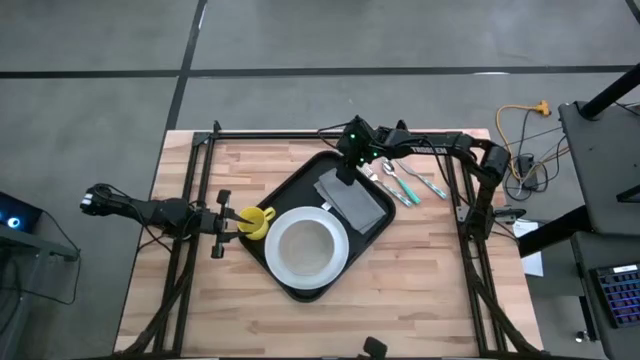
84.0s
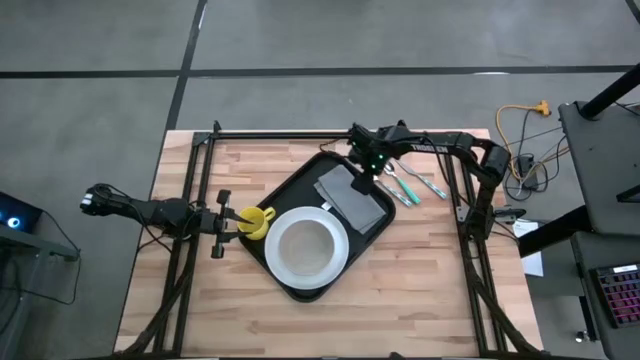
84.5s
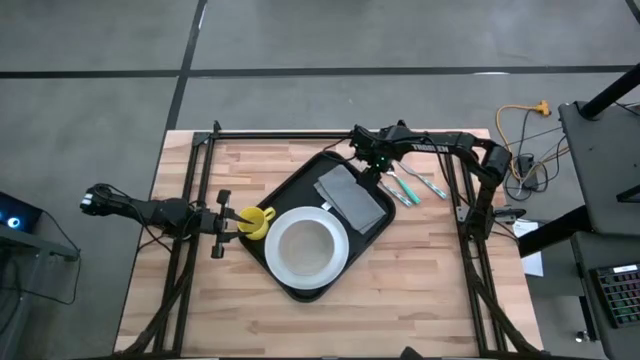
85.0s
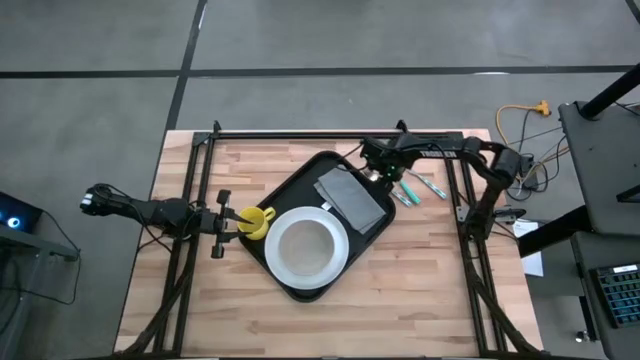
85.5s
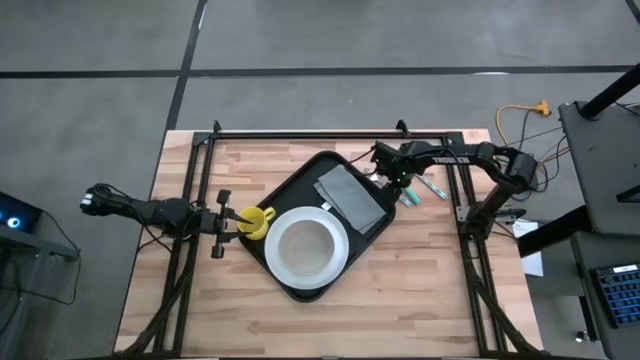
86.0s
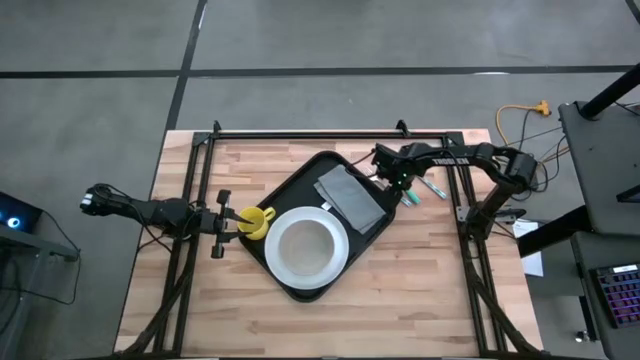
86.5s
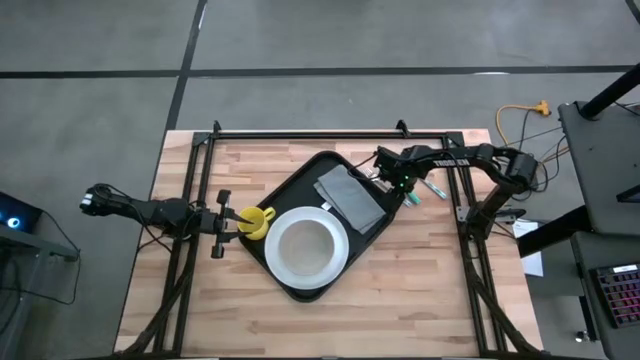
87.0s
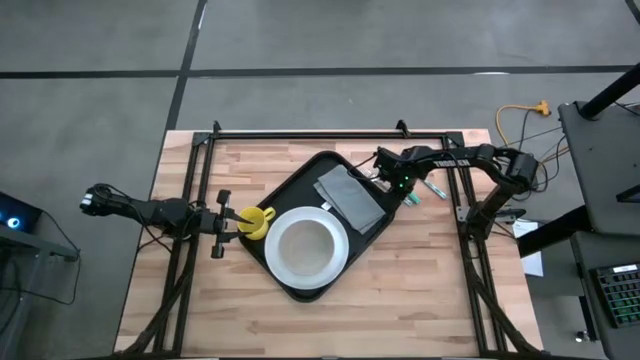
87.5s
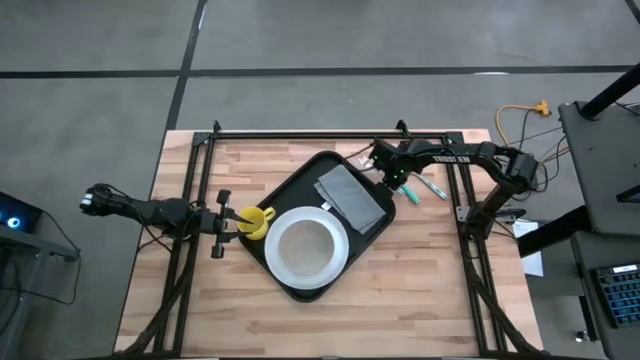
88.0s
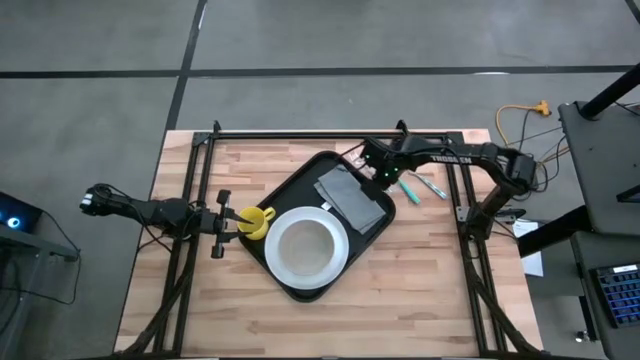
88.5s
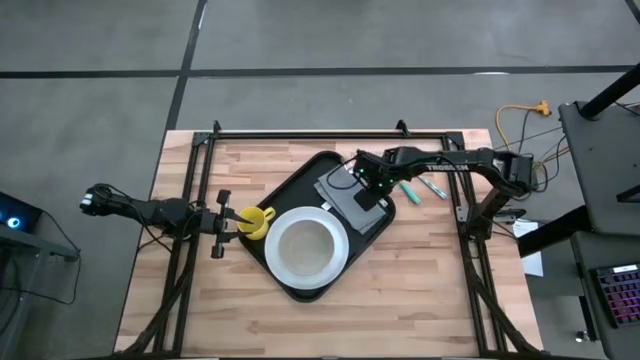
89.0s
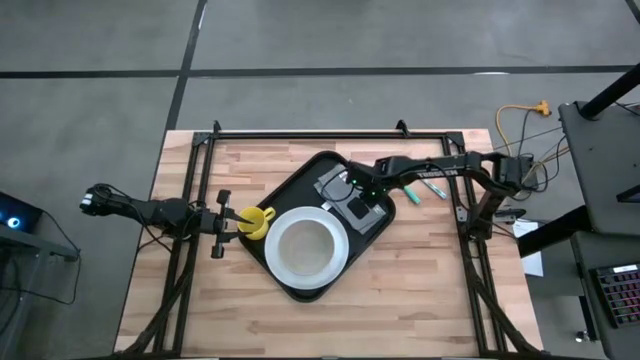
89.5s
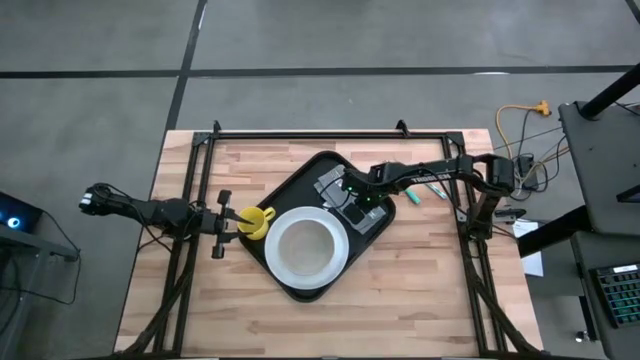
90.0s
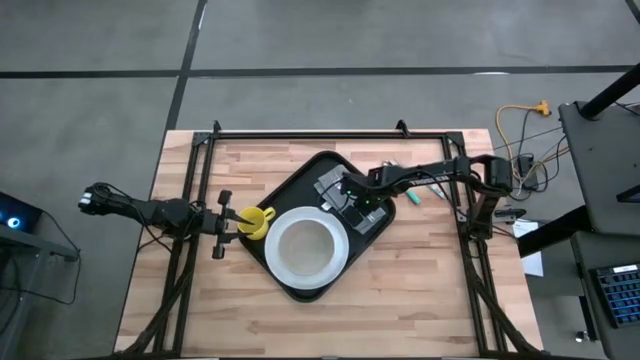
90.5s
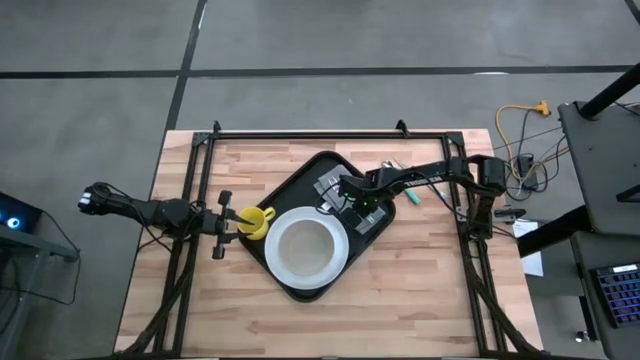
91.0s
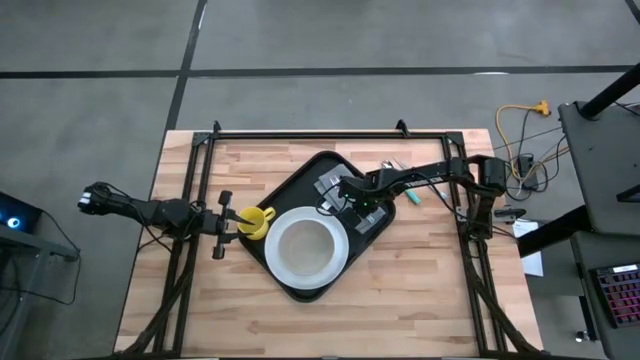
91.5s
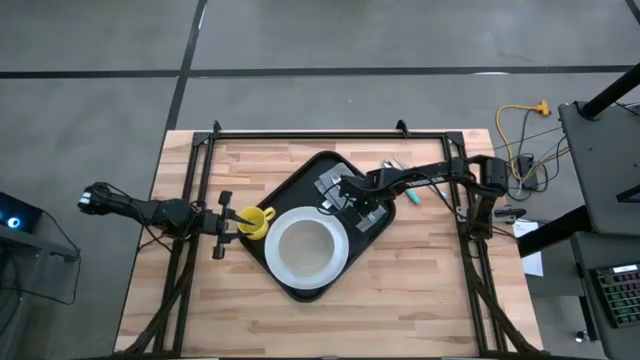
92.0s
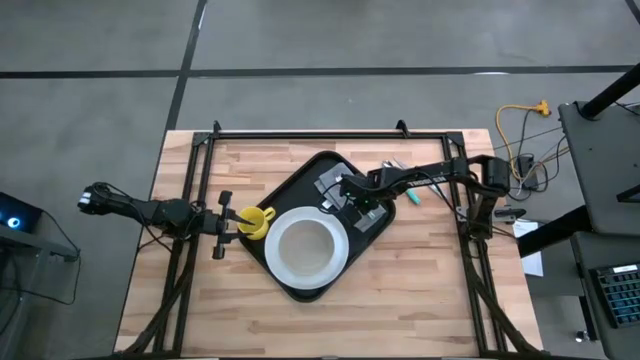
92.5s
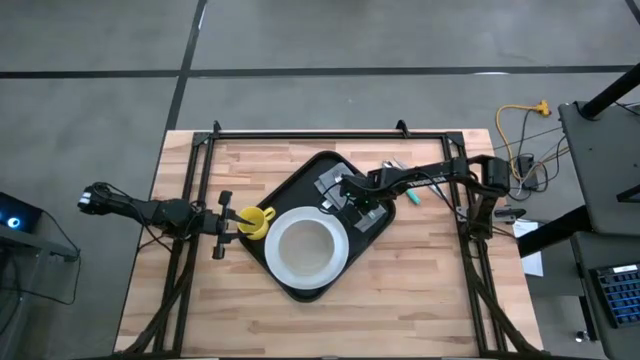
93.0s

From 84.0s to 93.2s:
Task: Set up tray
Put the white fork to the right of the white plate on top of the gray napkin on the black serving tray

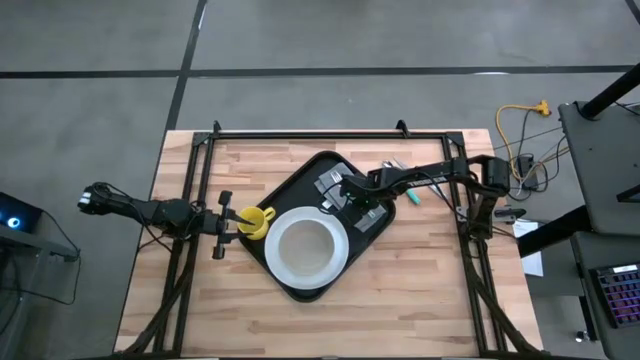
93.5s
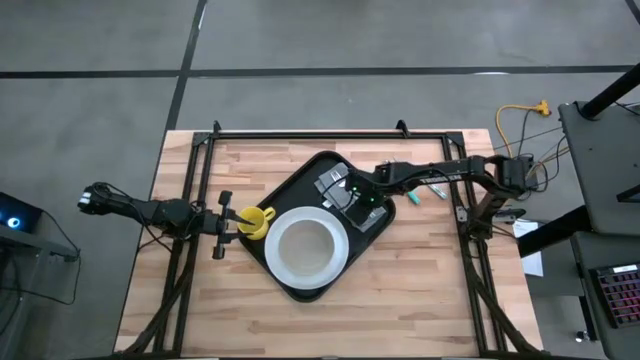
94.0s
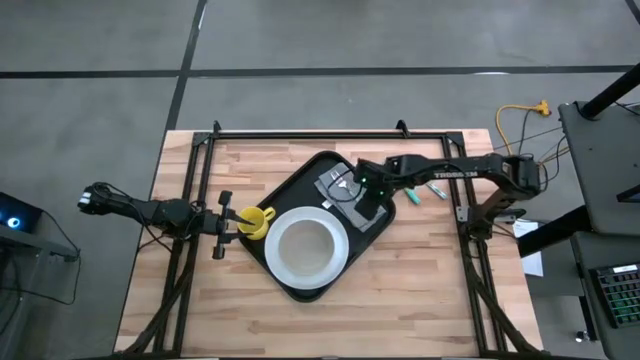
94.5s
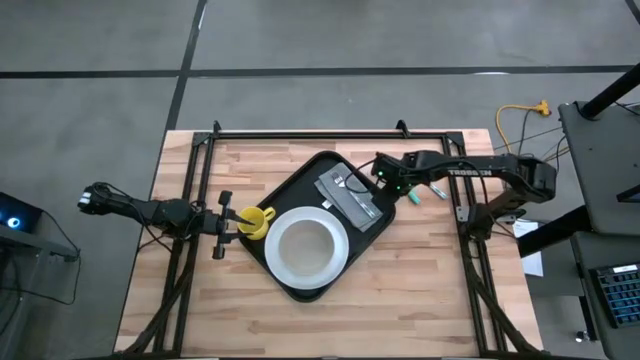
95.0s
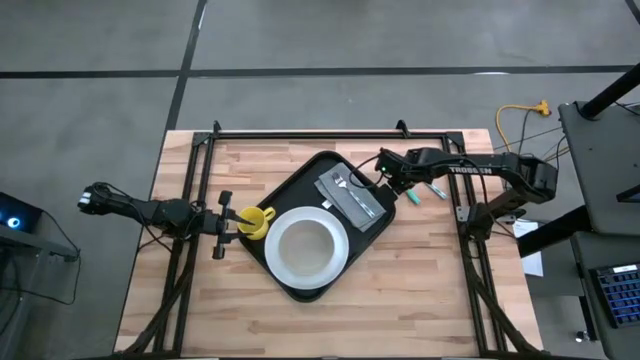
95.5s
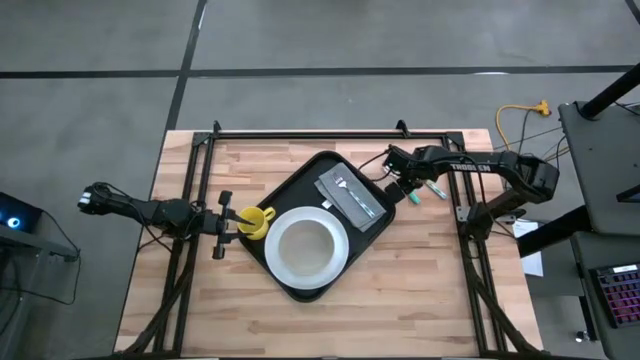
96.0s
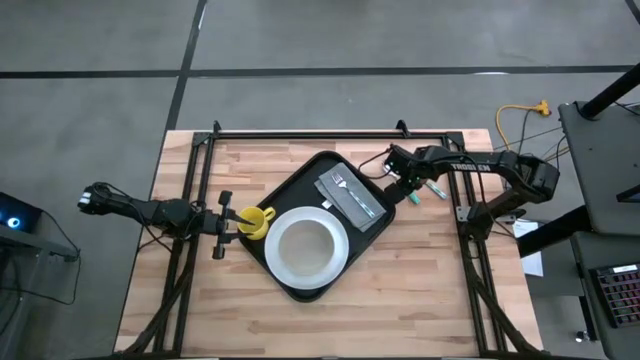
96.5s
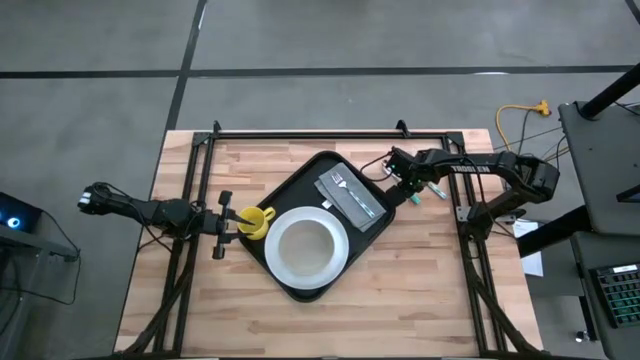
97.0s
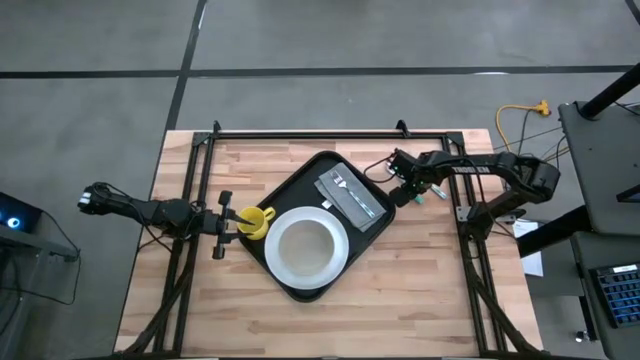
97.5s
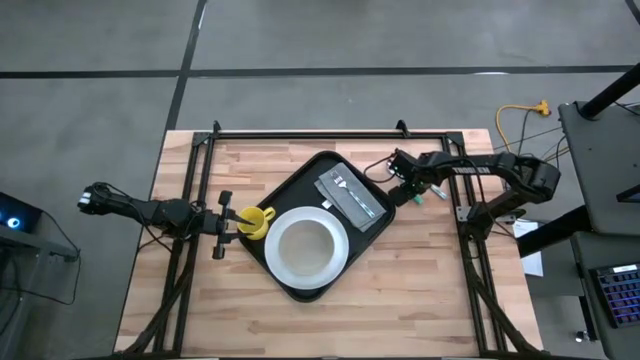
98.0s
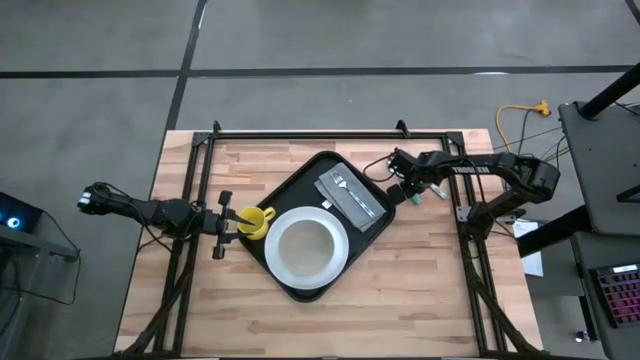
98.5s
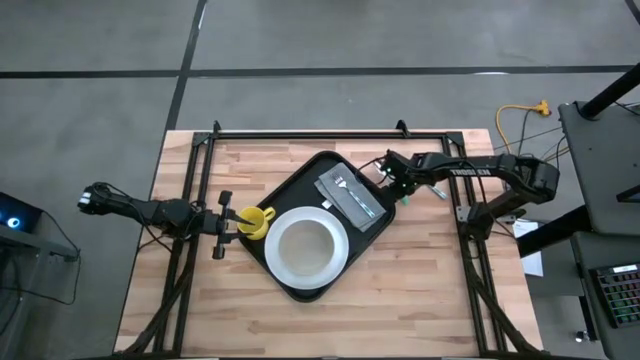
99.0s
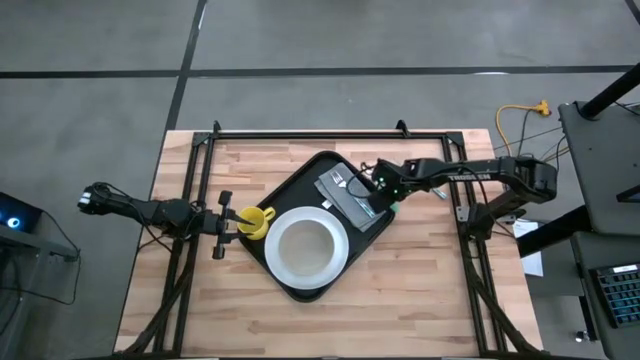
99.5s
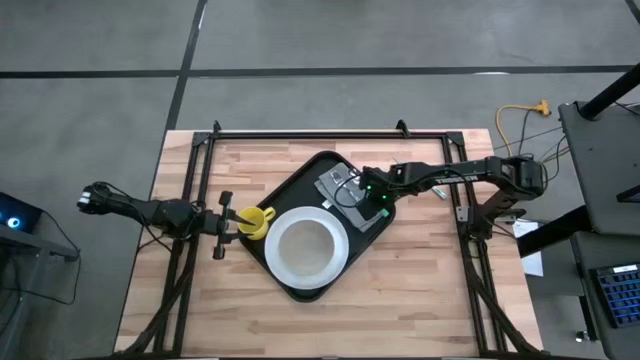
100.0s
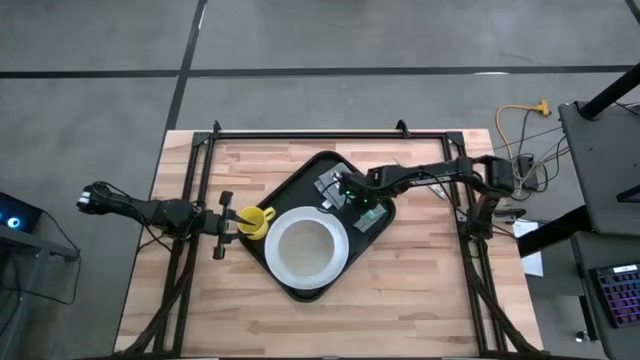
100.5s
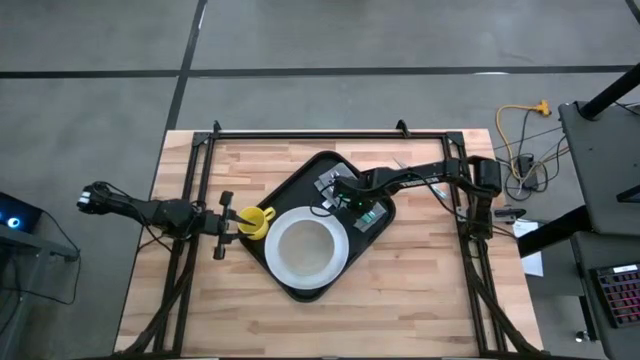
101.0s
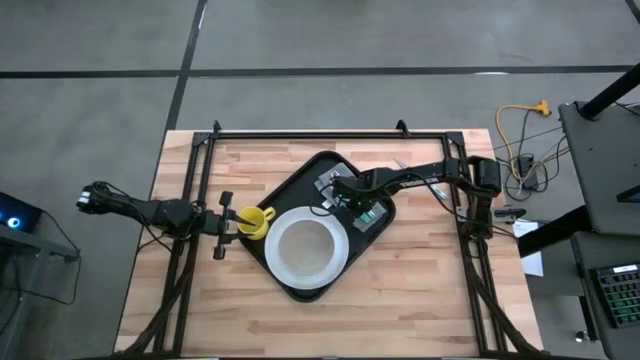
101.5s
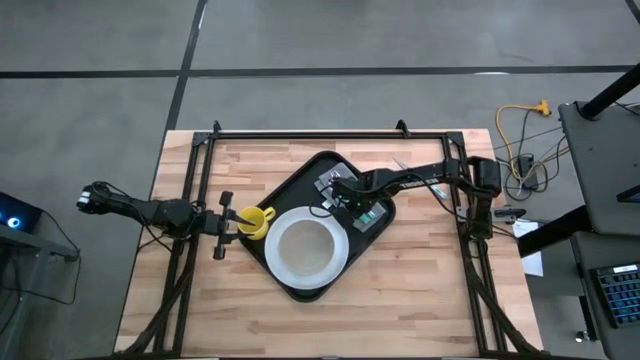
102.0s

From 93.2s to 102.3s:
Put the green spoon to the left of the white fork on top of the gray napkin on the black serving tray
